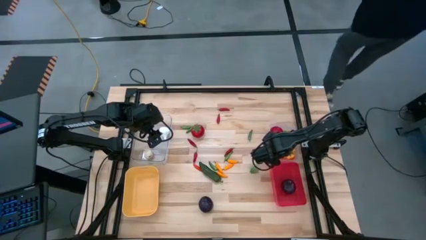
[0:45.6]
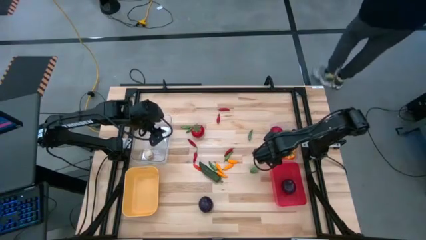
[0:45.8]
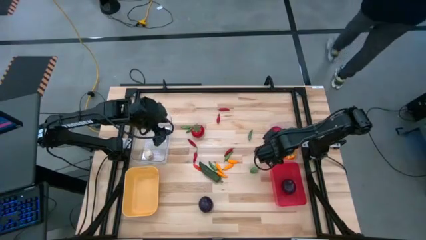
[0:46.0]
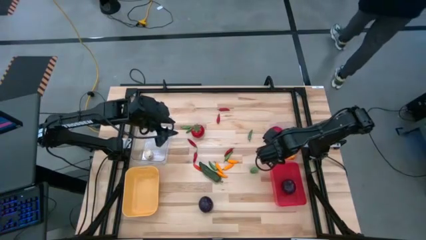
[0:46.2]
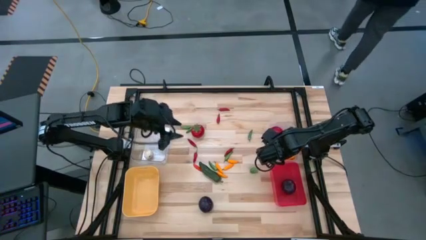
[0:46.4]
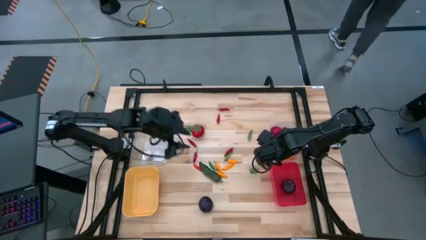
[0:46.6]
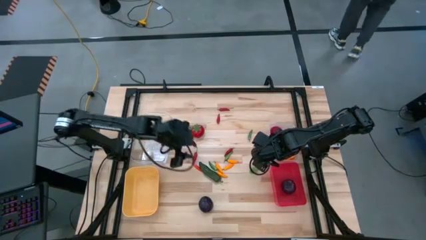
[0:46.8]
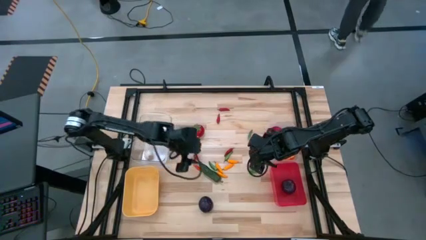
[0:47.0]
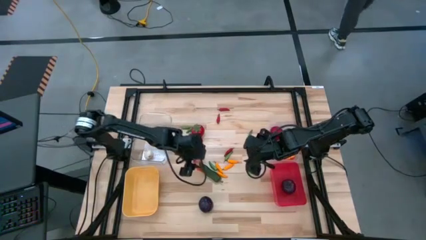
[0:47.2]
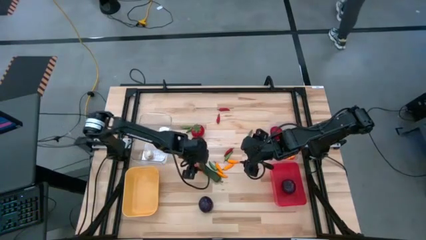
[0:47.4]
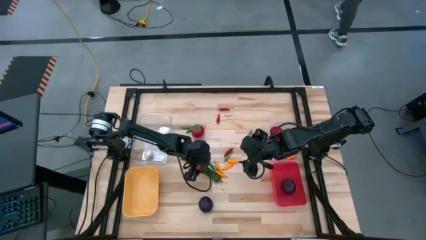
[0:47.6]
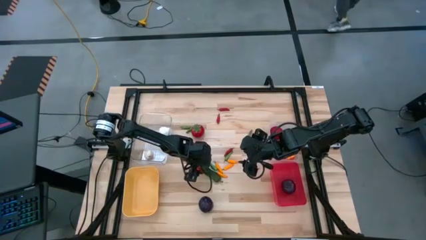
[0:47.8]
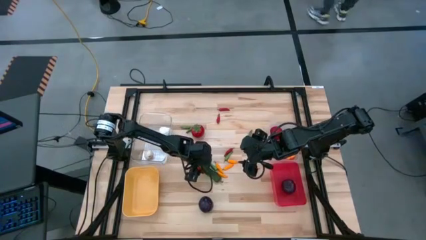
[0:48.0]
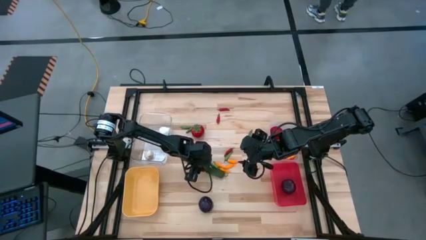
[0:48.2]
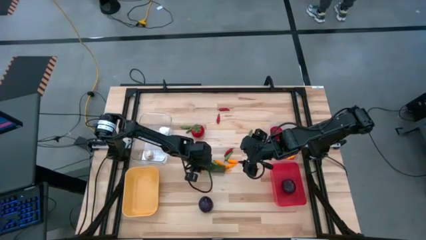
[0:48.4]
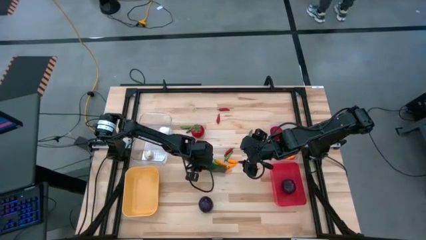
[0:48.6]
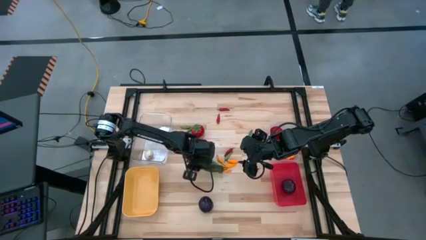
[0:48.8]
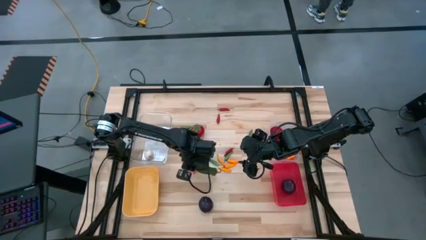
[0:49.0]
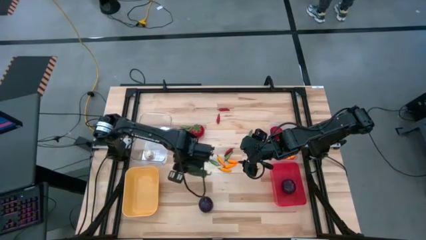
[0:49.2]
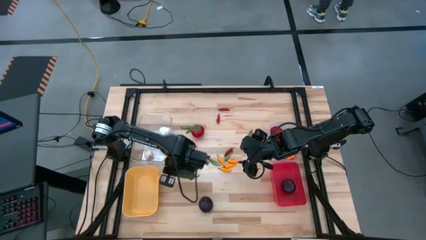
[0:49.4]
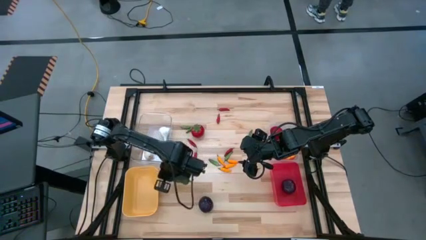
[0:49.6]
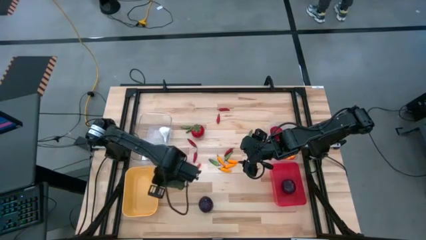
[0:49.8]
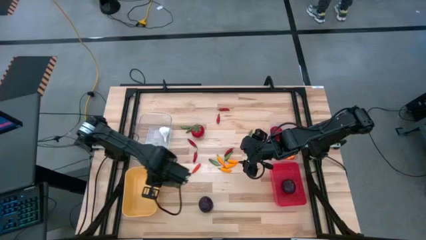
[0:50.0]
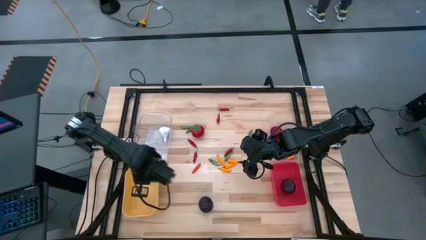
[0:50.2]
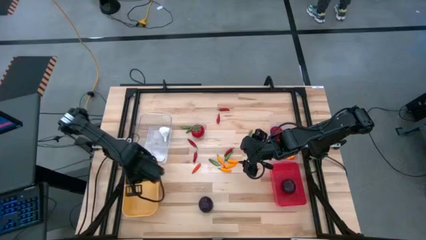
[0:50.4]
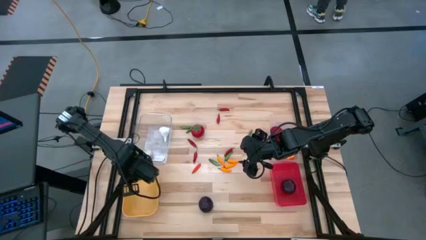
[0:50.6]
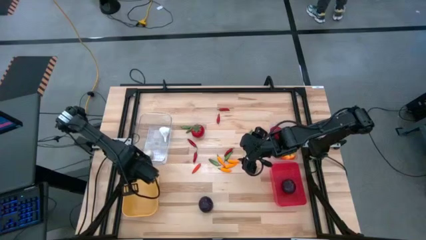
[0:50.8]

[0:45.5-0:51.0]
Task: Sort produce into baskets
Put the green chili pepper into the yellow bin

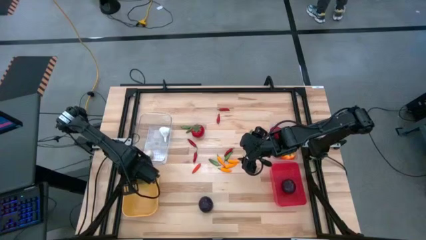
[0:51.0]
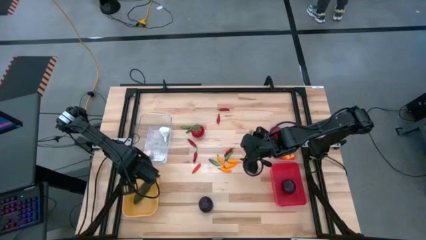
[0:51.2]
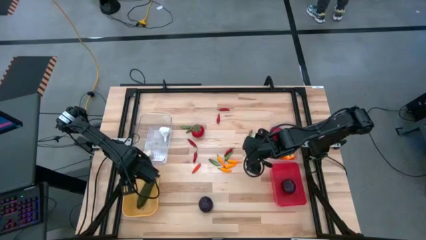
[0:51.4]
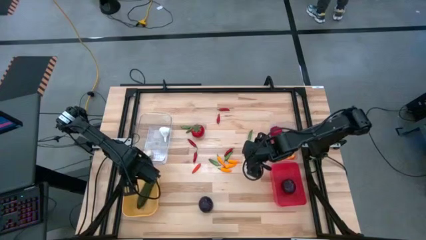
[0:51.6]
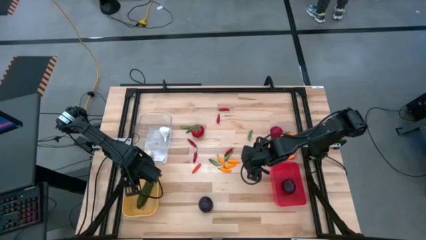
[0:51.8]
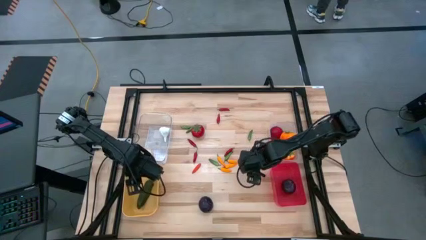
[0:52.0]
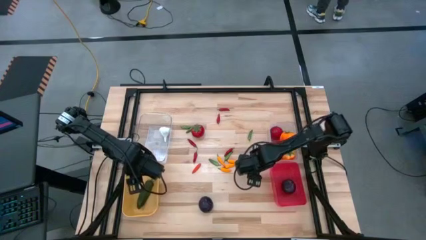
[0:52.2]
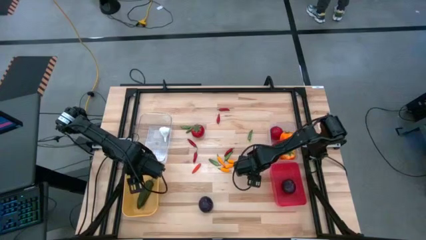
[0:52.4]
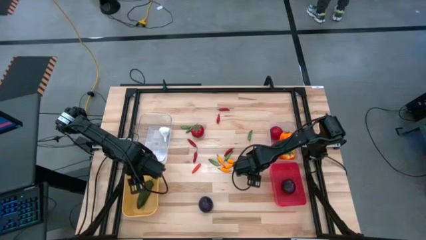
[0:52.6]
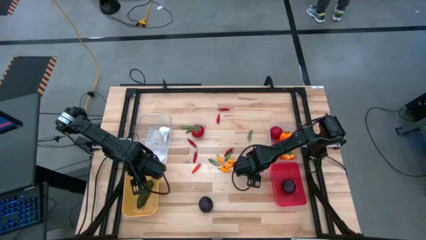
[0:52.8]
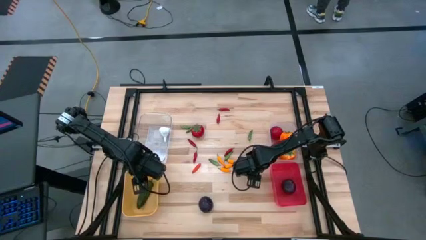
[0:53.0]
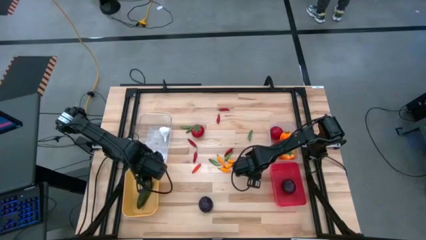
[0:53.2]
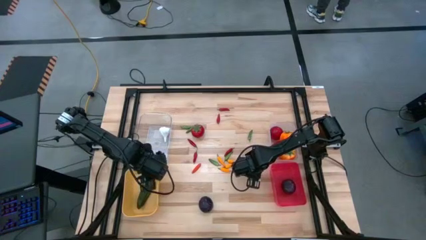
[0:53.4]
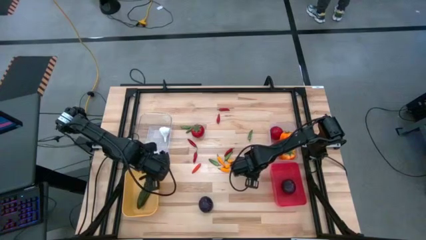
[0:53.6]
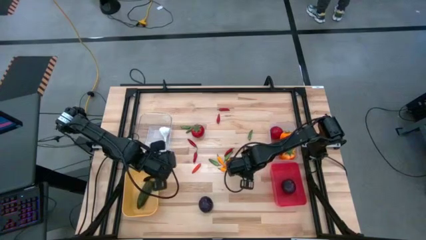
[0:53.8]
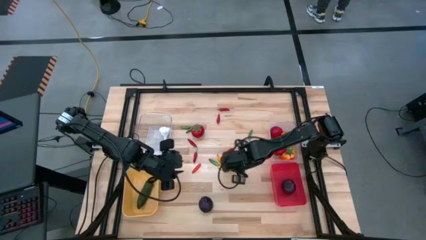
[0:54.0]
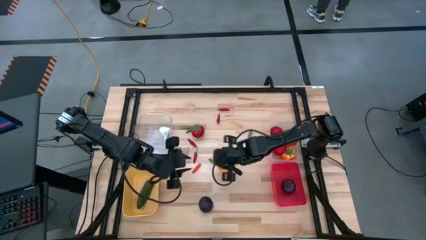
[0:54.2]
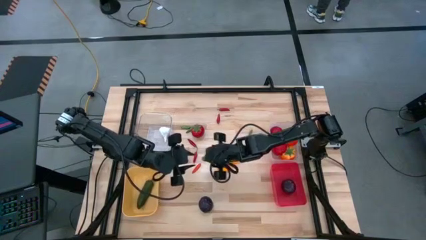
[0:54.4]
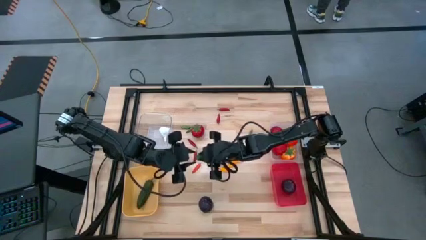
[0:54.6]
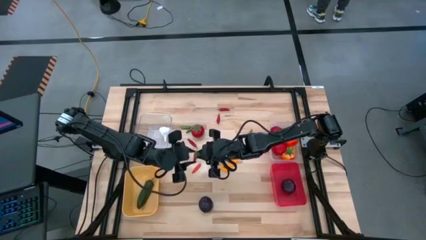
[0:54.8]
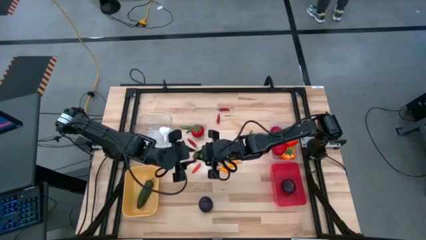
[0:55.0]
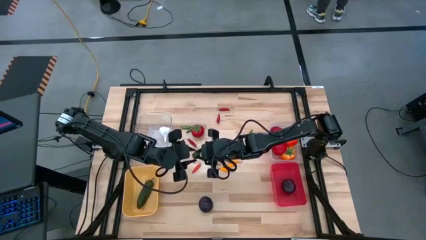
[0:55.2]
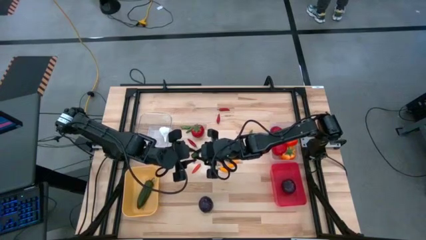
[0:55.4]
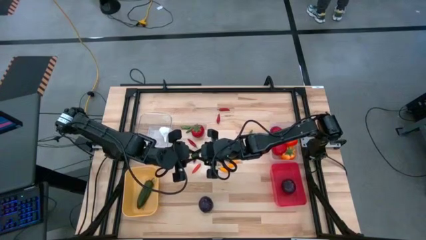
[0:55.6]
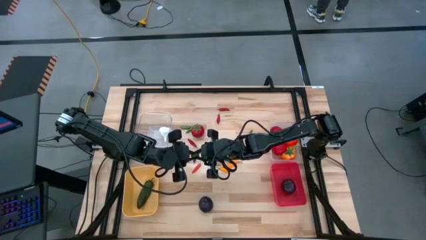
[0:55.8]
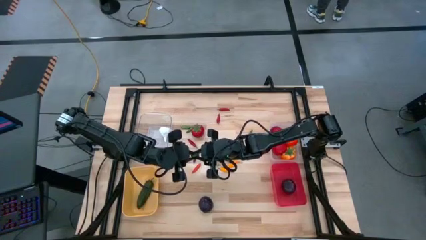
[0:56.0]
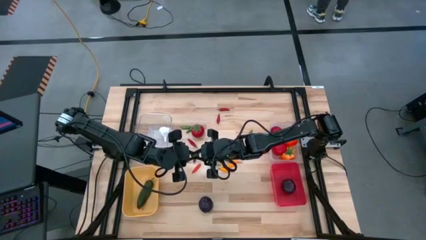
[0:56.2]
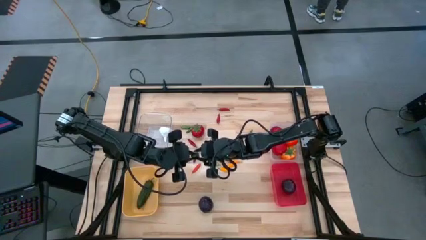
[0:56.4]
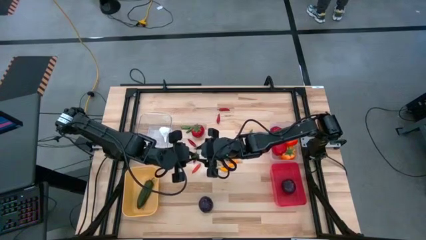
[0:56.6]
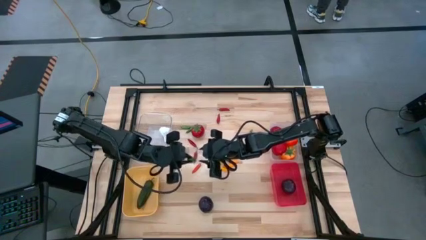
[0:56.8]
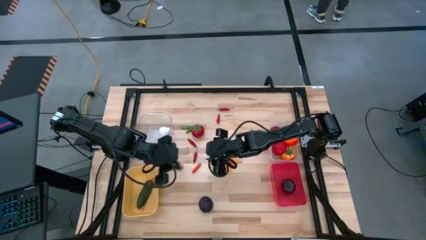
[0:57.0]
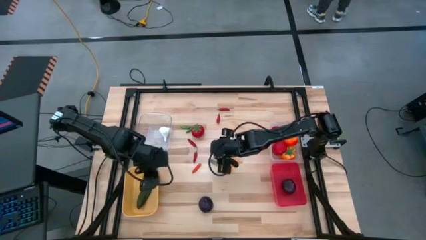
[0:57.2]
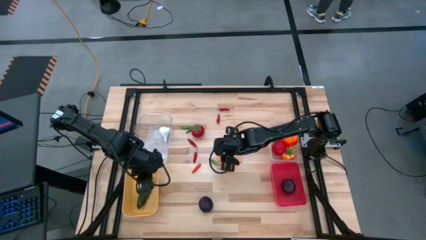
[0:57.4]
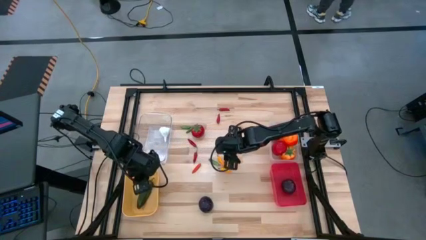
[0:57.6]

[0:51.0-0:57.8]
Put the green chili pepper into the yellow bin

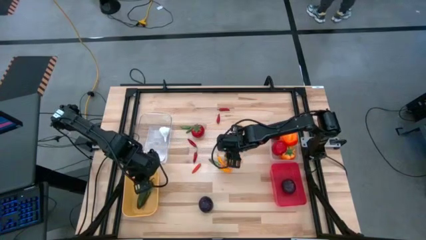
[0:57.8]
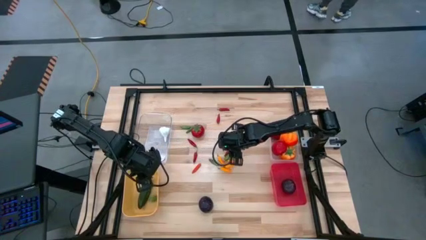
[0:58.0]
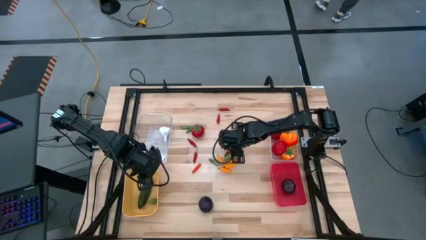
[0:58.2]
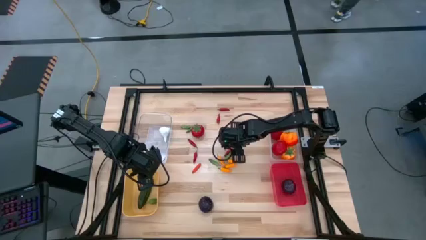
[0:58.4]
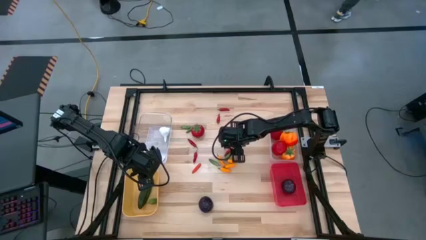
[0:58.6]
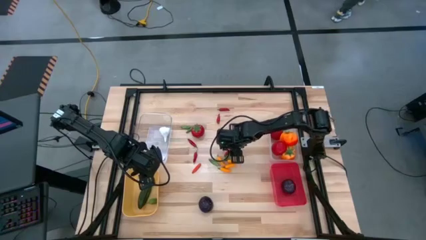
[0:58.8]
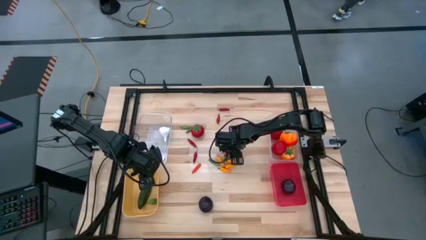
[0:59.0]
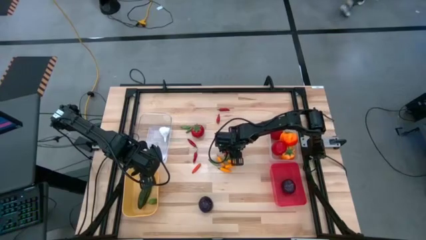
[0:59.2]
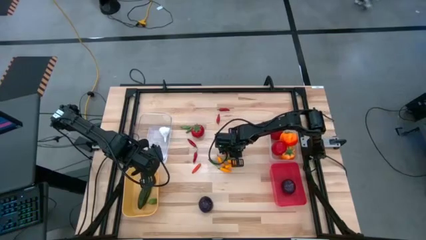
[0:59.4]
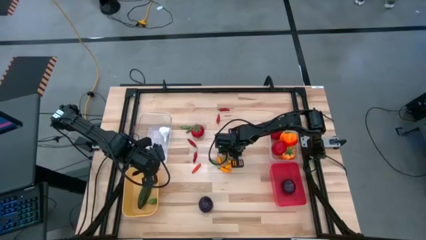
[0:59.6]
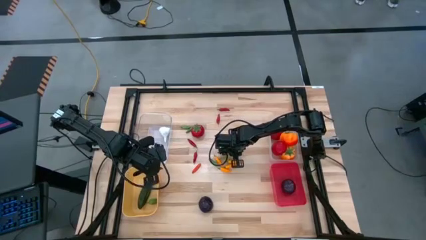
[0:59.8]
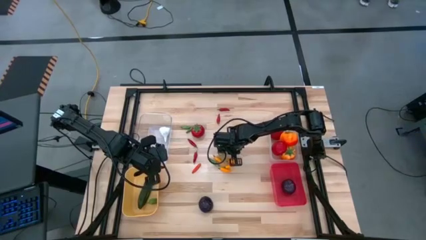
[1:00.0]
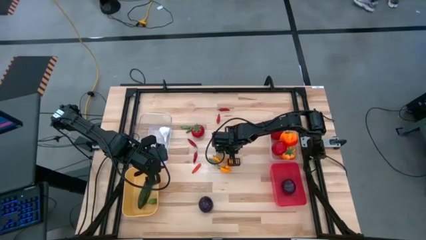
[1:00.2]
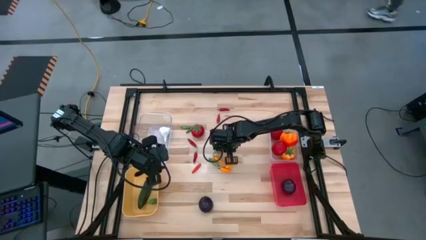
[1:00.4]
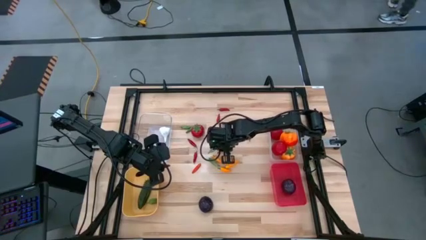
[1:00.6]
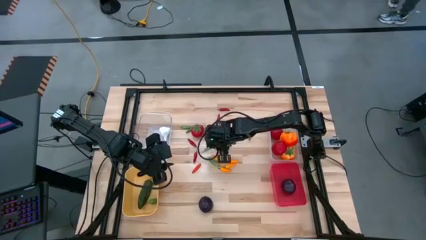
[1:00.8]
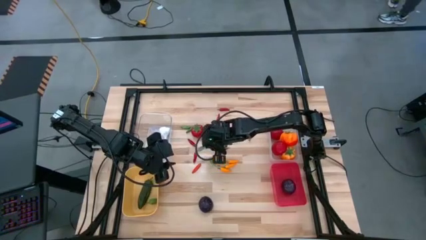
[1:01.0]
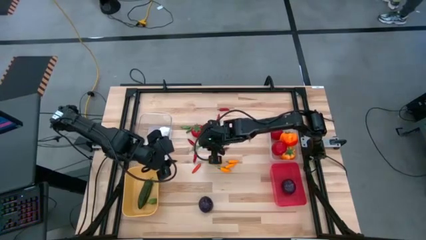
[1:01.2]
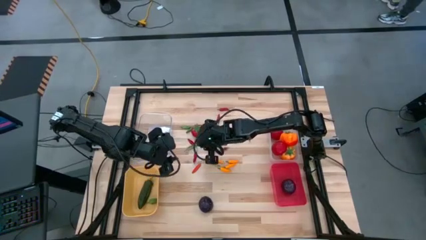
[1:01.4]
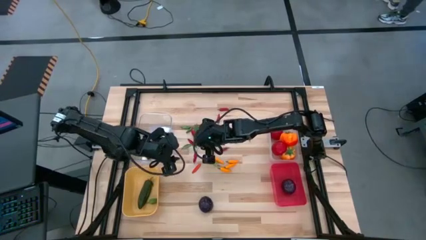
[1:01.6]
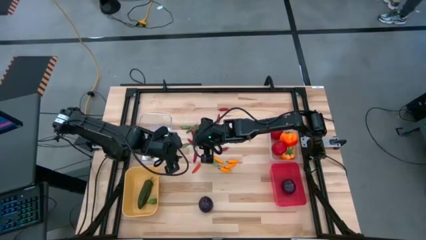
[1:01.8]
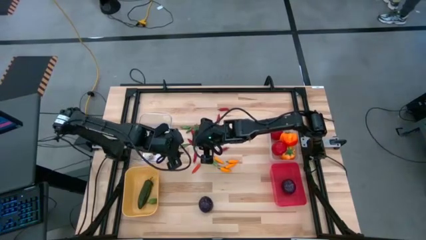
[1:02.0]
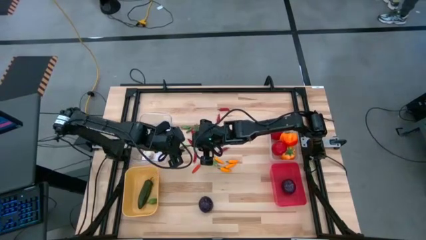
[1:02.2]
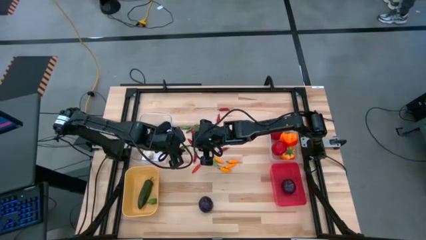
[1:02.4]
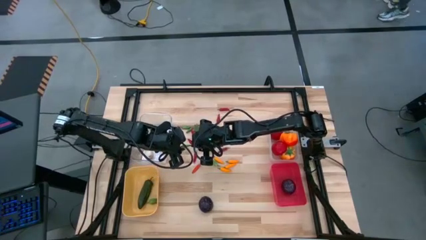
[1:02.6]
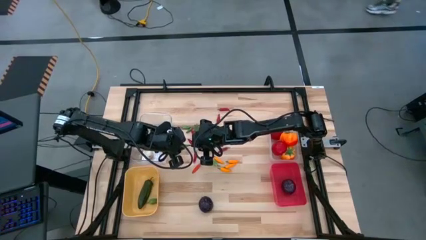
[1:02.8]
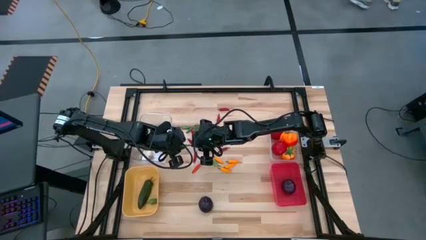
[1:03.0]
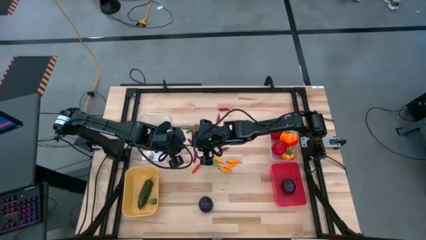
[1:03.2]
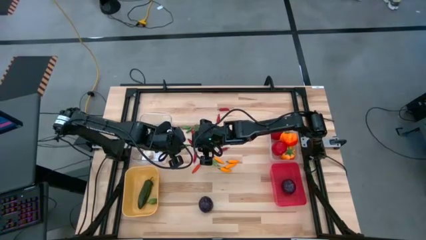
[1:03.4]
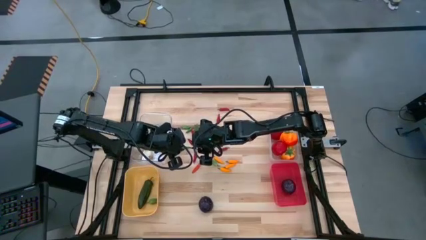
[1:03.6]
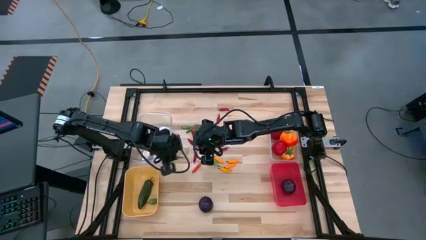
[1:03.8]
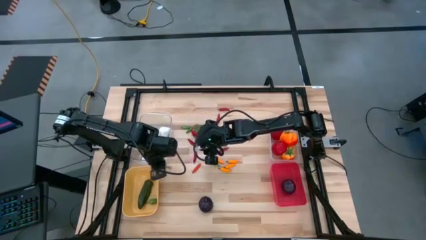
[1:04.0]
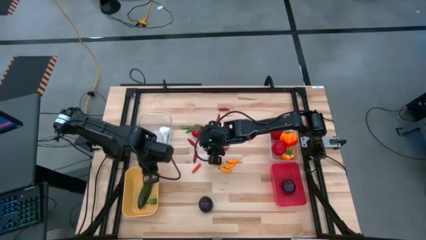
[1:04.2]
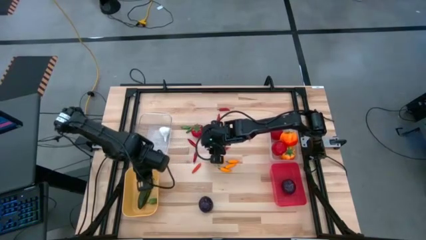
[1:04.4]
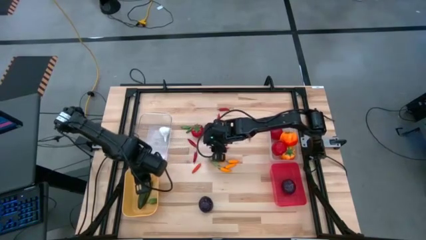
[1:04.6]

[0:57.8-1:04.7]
Put the green chili pepper into the yellow bin
